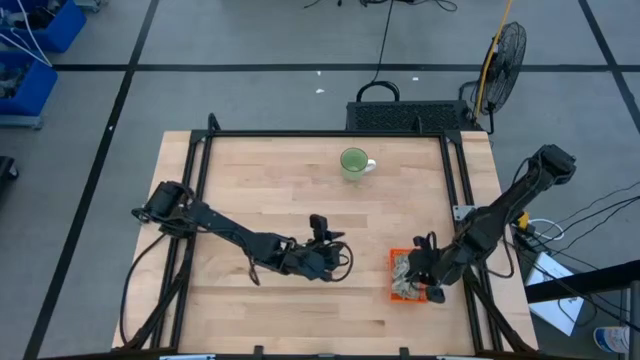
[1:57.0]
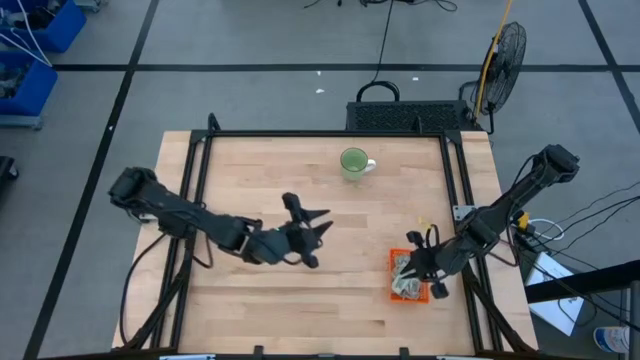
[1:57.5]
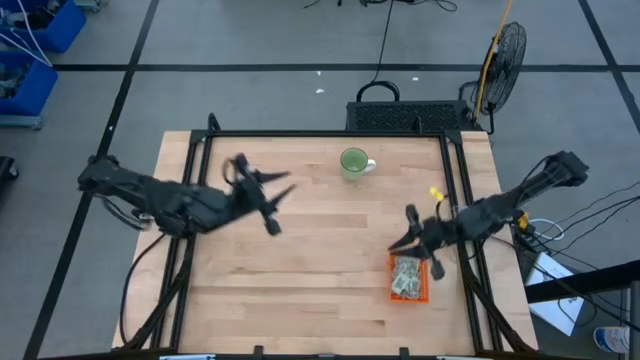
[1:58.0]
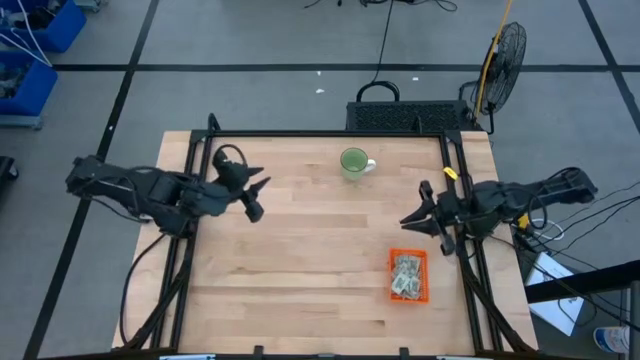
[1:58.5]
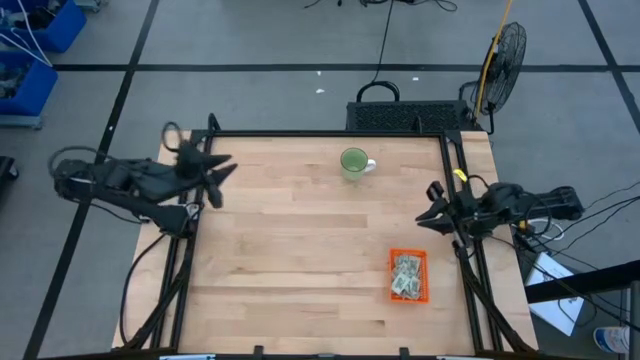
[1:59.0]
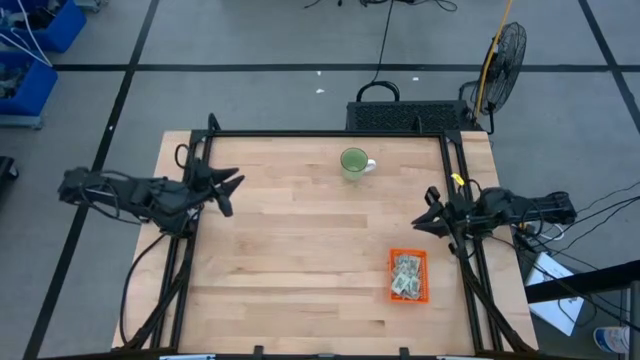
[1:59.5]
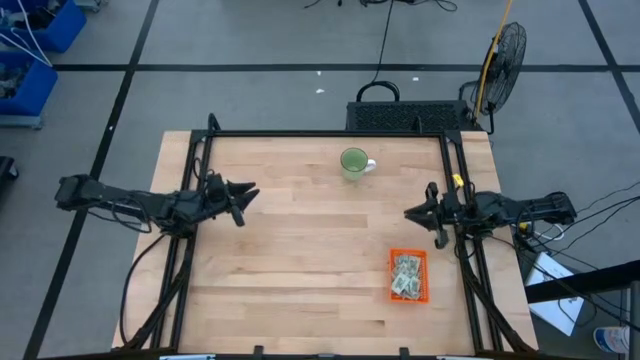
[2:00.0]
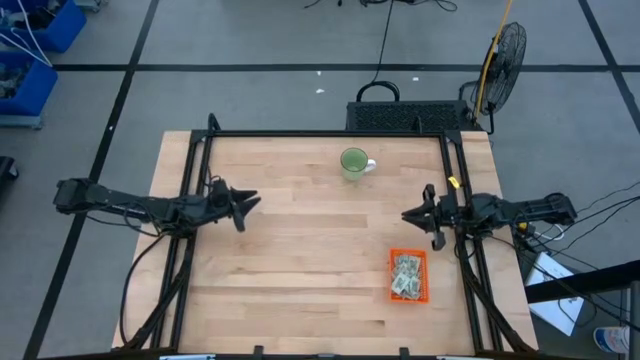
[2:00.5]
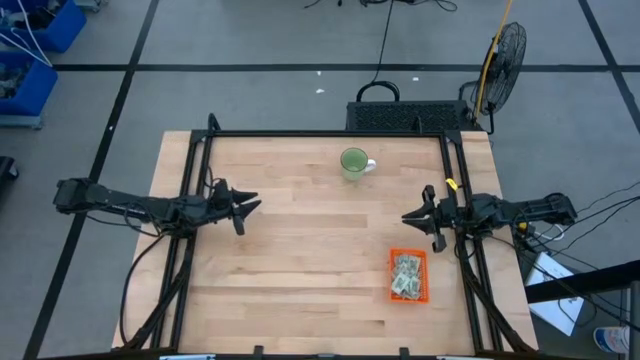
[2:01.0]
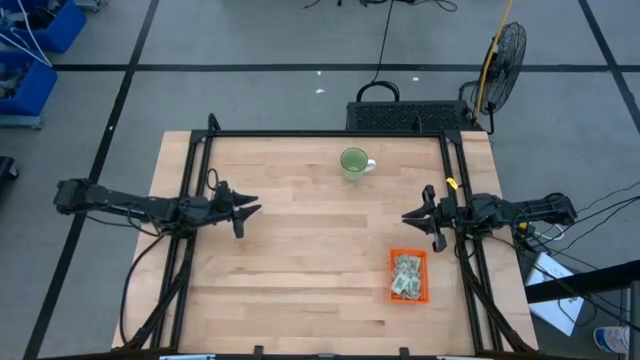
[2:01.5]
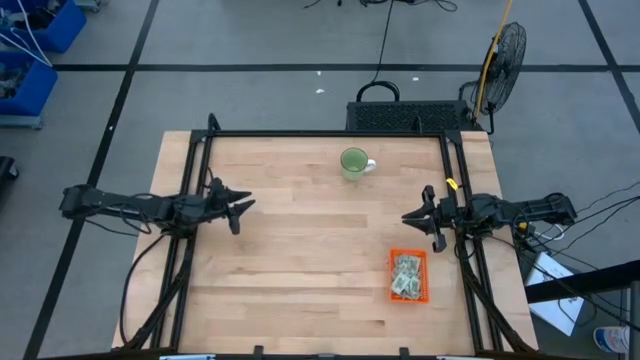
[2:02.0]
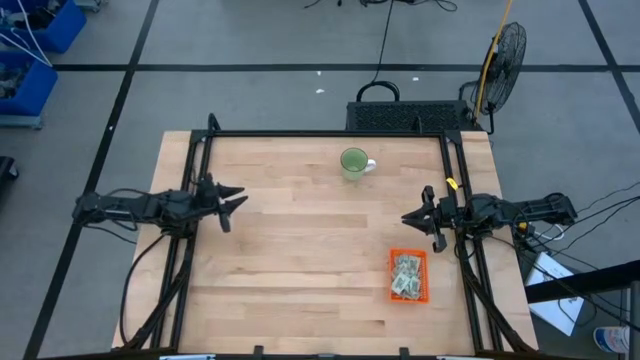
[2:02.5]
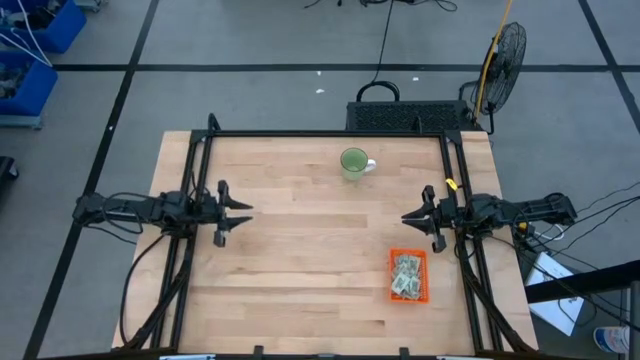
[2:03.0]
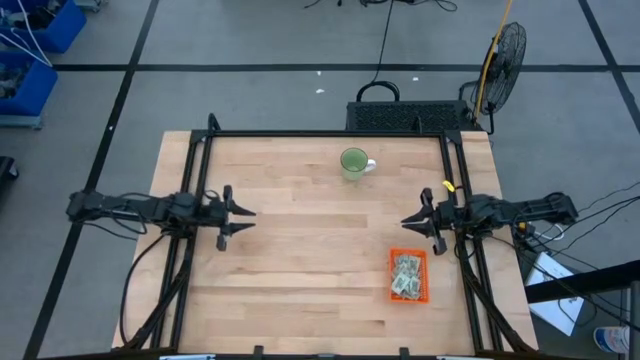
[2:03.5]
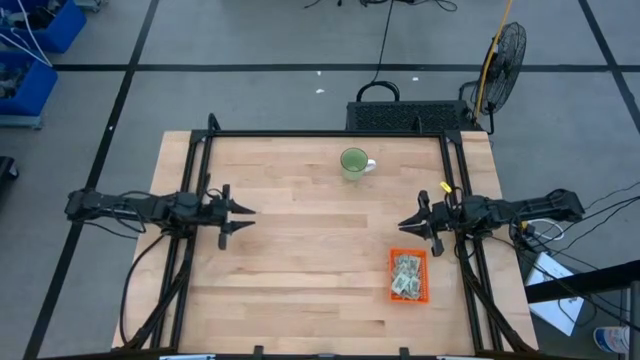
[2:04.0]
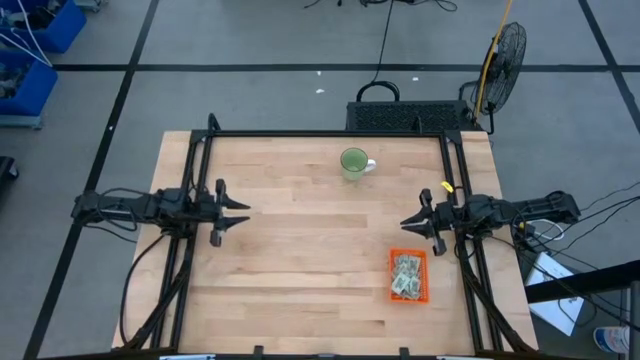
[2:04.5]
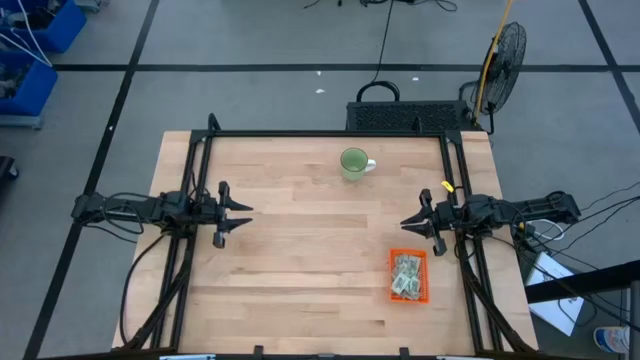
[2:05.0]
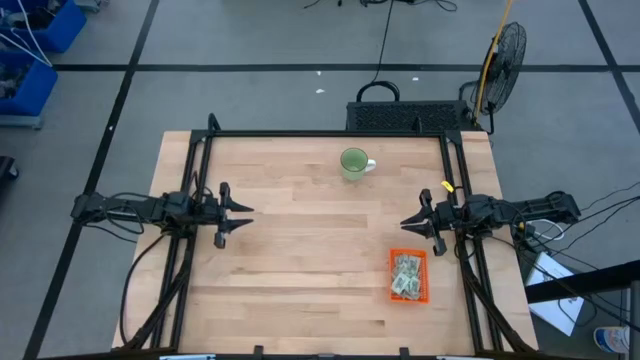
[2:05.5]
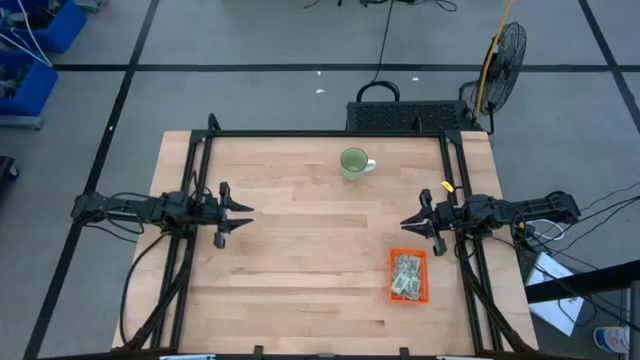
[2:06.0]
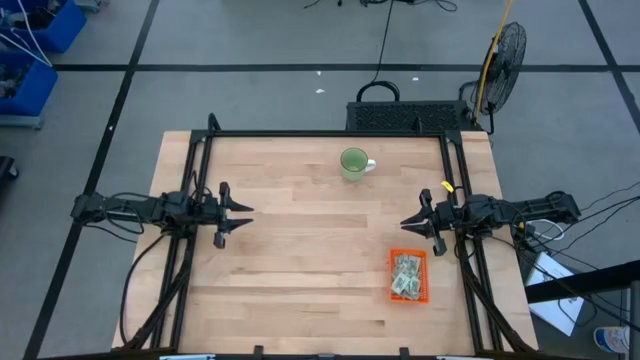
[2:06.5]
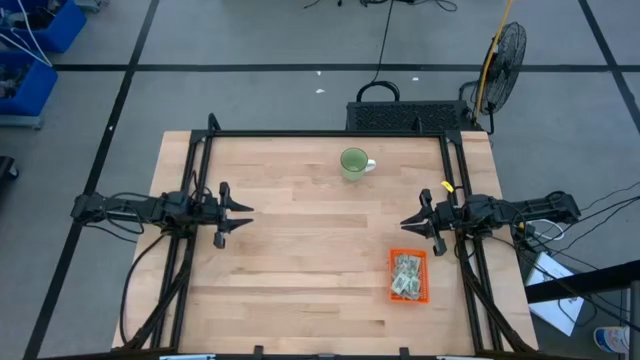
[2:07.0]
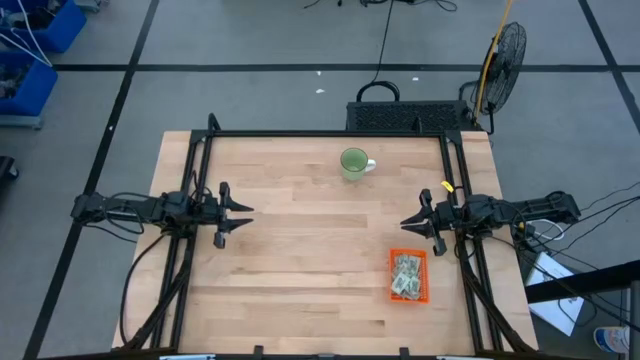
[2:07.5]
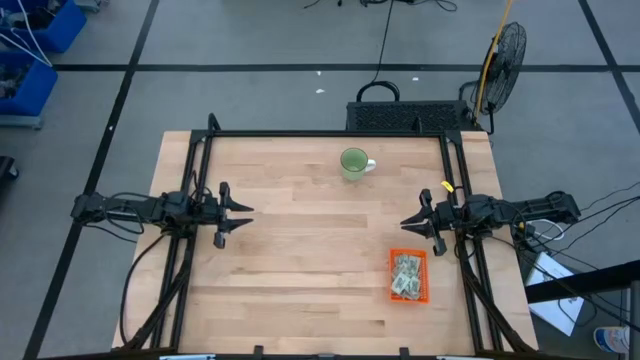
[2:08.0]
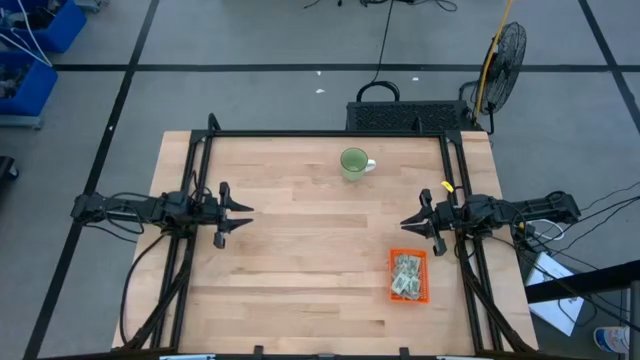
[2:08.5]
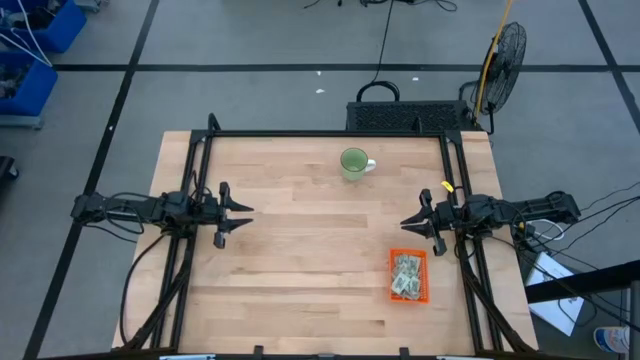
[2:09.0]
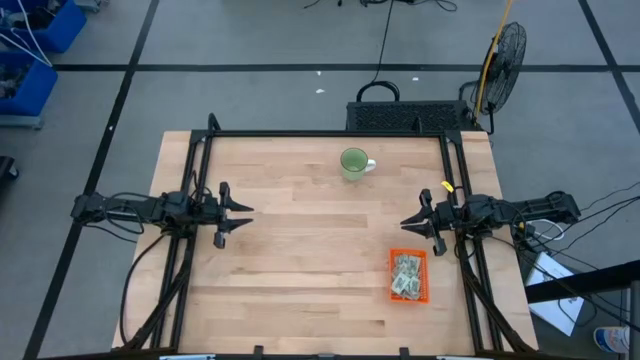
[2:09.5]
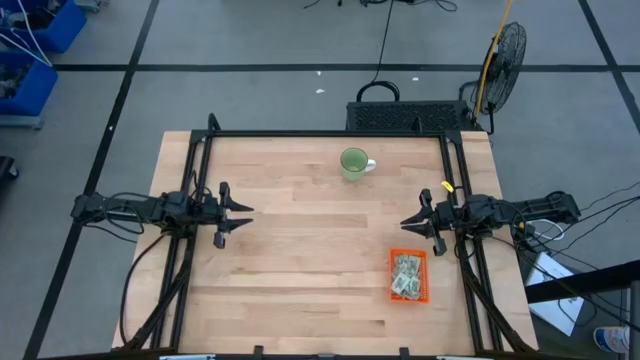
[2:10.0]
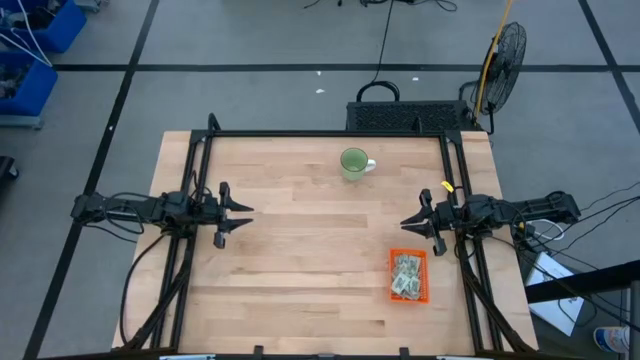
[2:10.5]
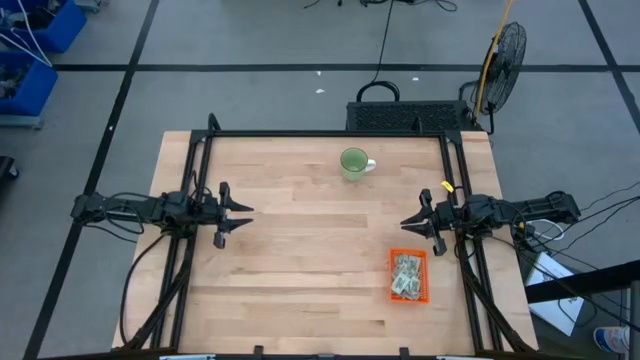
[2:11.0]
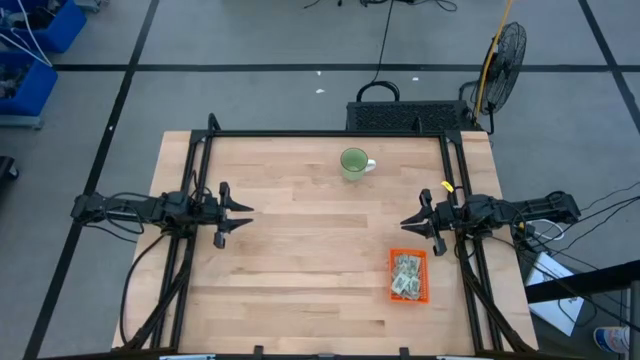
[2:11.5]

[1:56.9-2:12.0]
Task: Pick and place Stevia / Truvia into bins
Return to Home Position

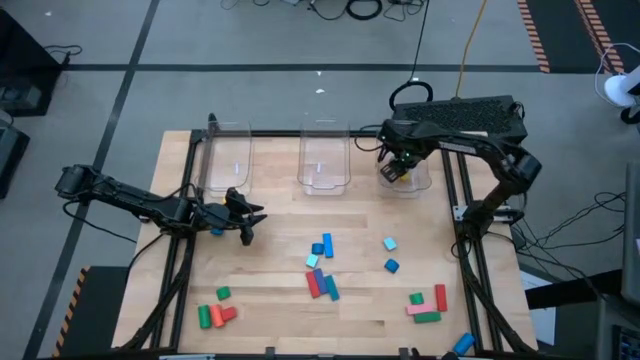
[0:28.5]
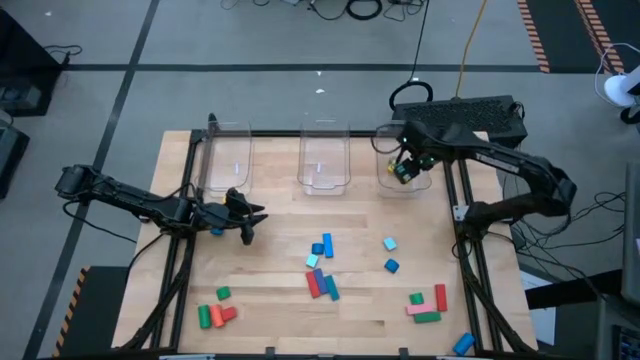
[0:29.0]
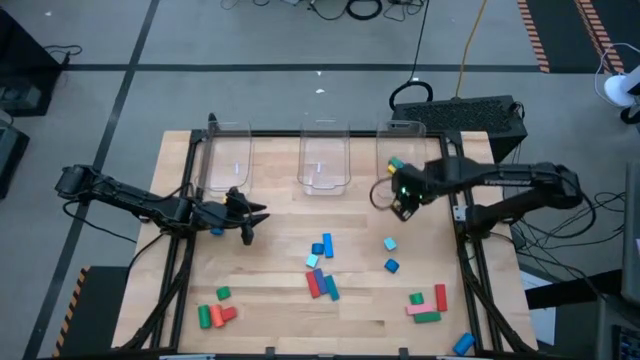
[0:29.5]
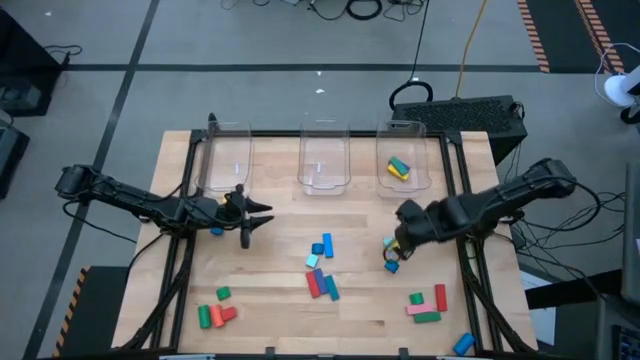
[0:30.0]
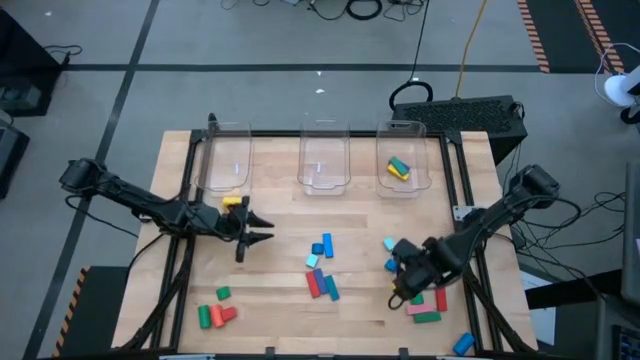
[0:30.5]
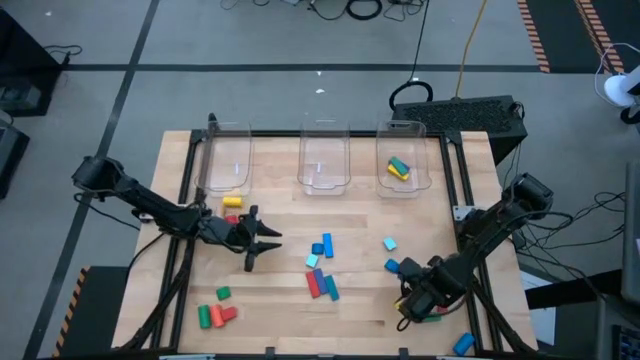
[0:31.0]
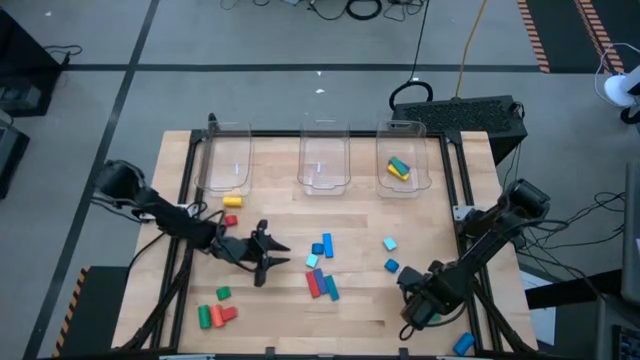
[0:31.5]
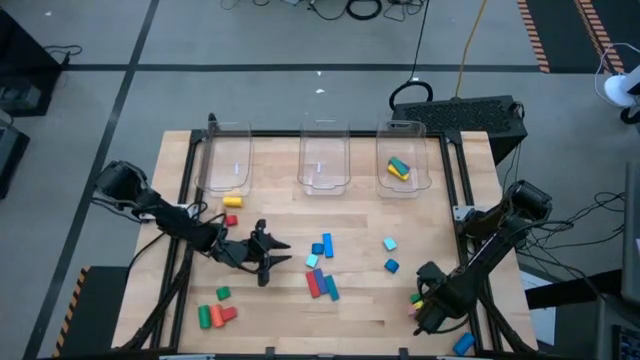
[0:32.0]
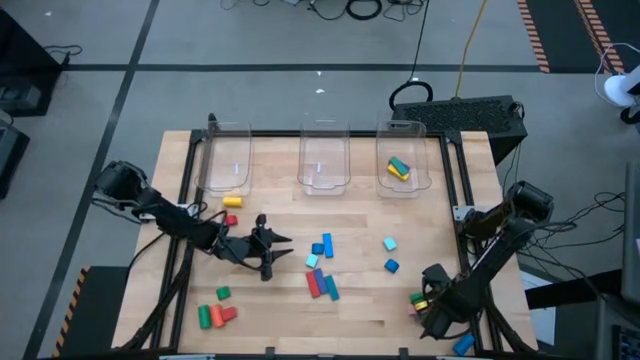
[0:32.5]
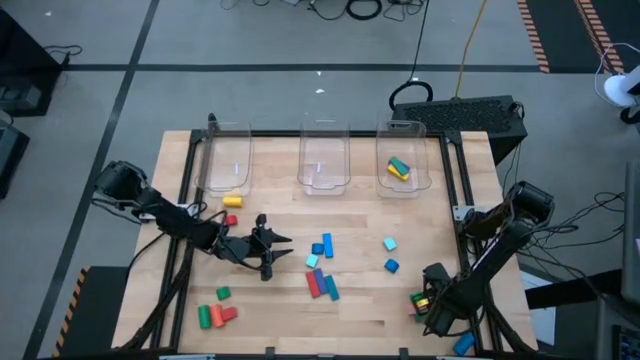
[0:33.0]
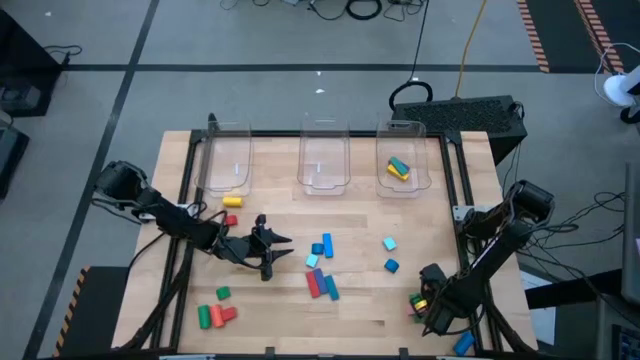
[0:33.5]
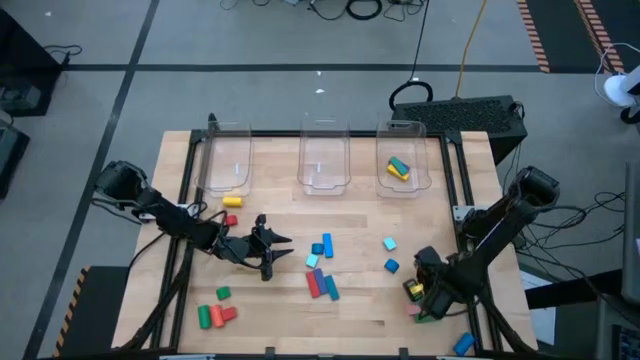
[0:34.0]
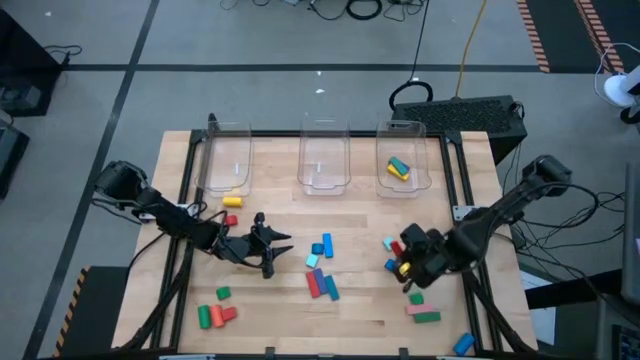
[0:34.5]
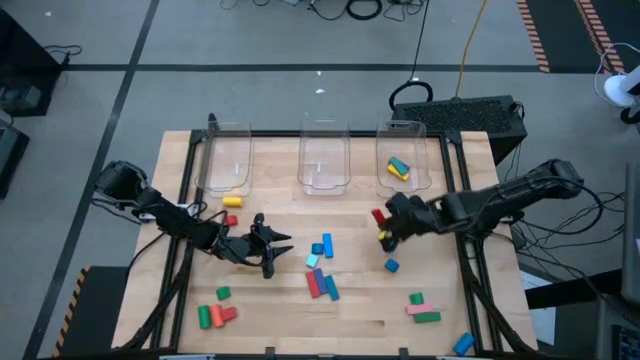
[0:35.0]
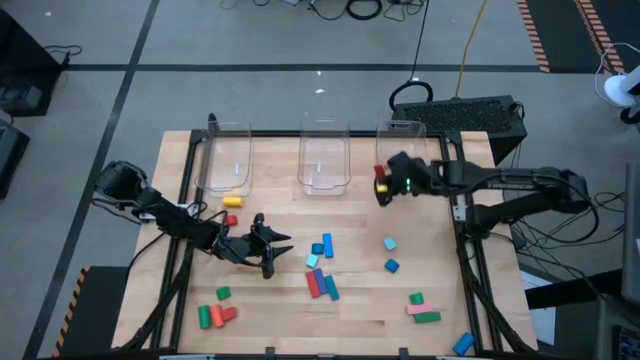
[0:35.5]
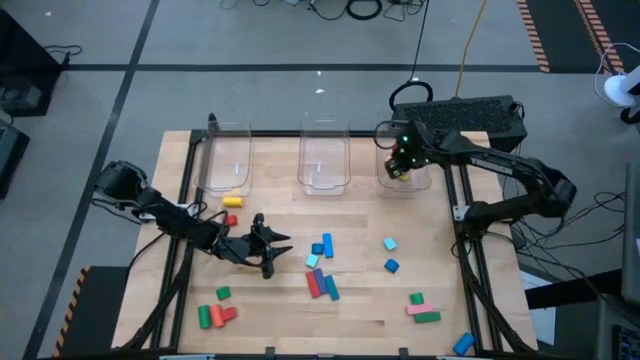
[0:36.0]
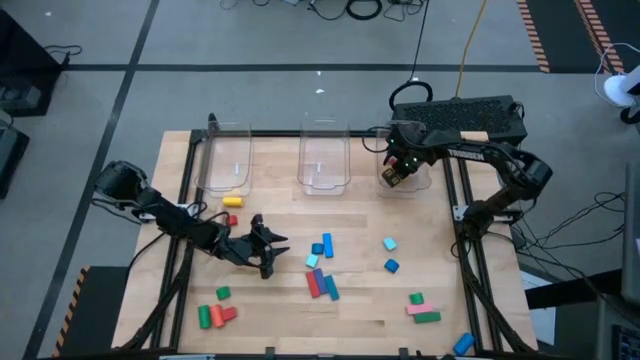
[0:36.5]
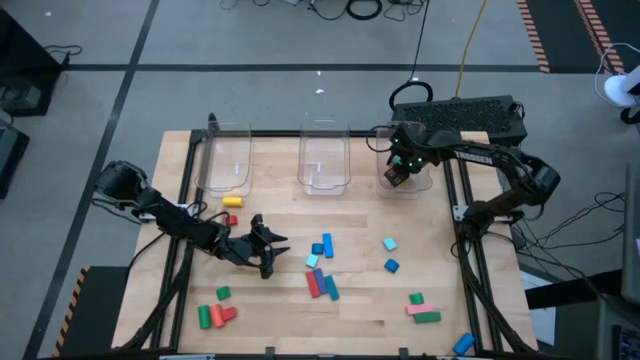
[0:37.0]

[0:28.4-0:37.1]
Task: Sort blocks by size
Put the red rectangular block into the right transparent bin
